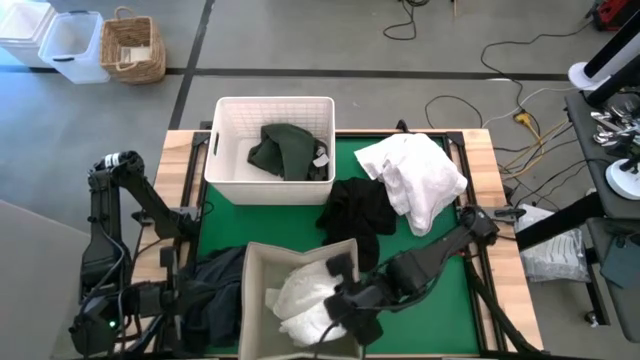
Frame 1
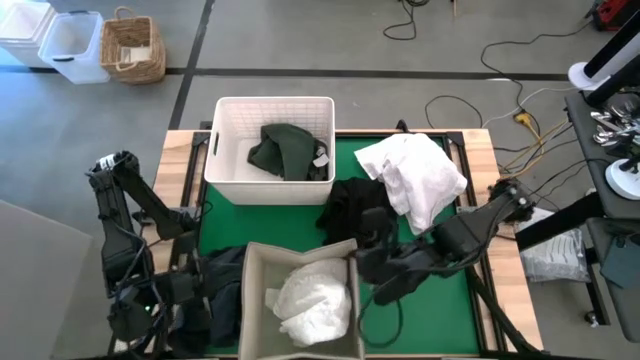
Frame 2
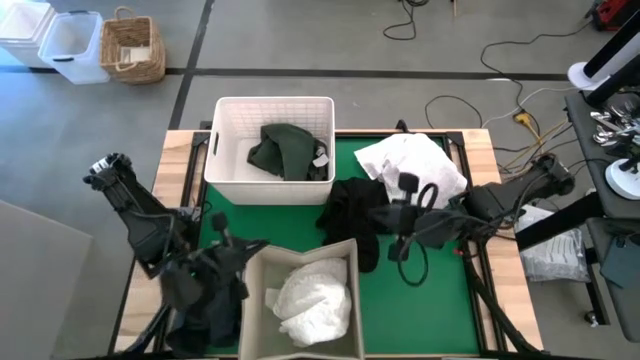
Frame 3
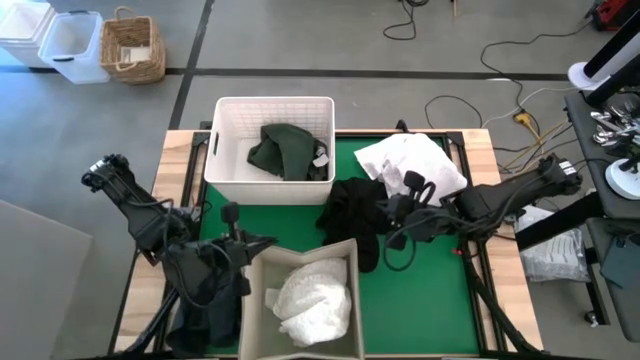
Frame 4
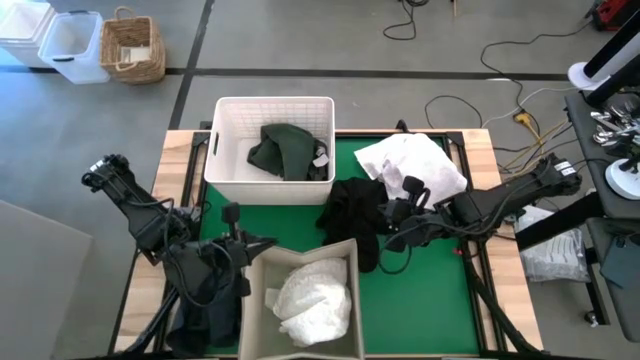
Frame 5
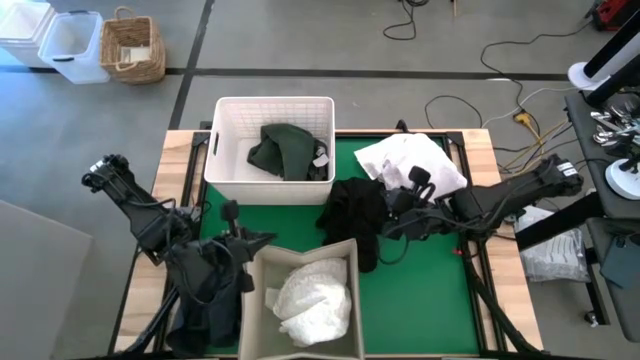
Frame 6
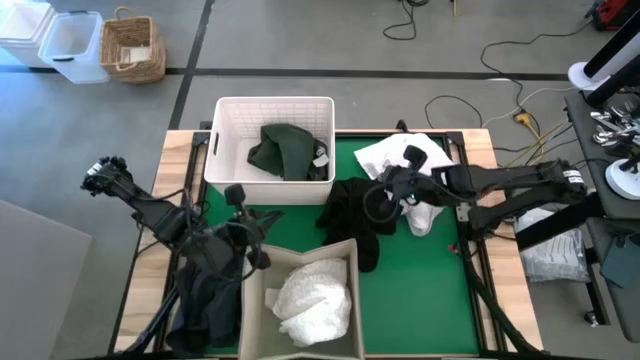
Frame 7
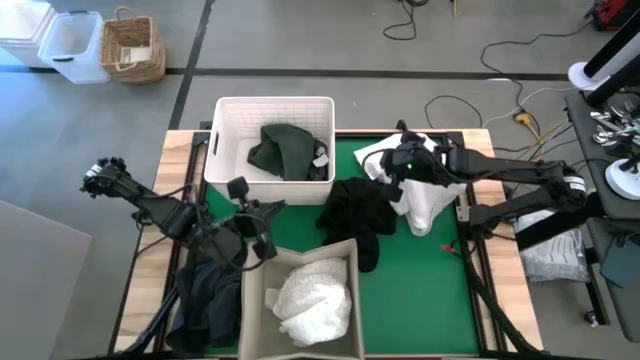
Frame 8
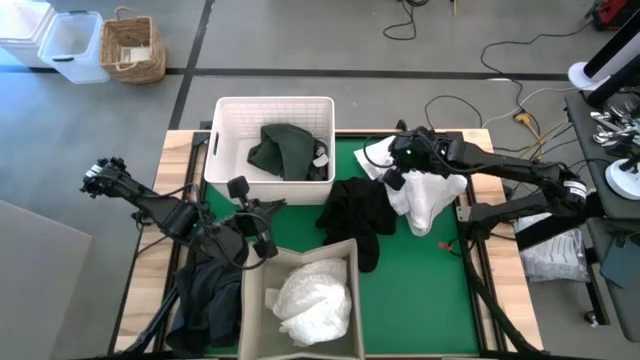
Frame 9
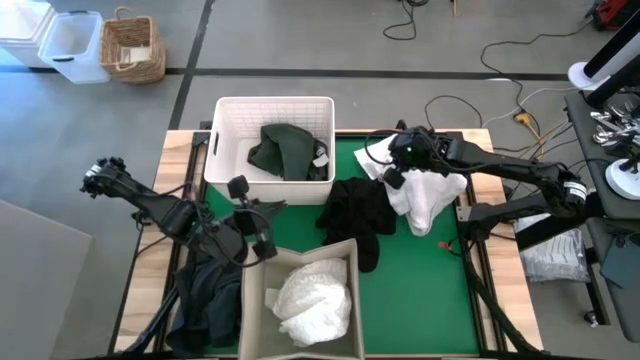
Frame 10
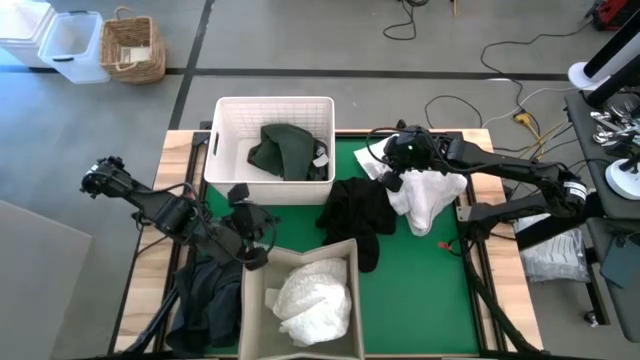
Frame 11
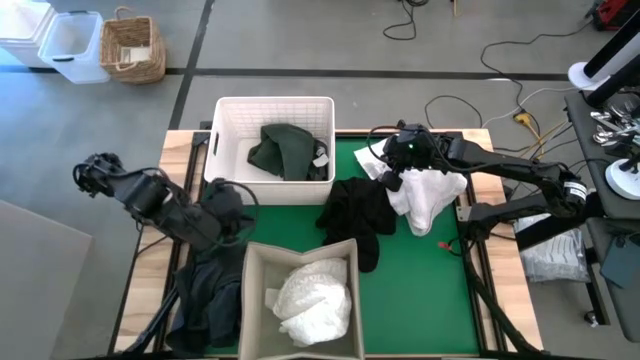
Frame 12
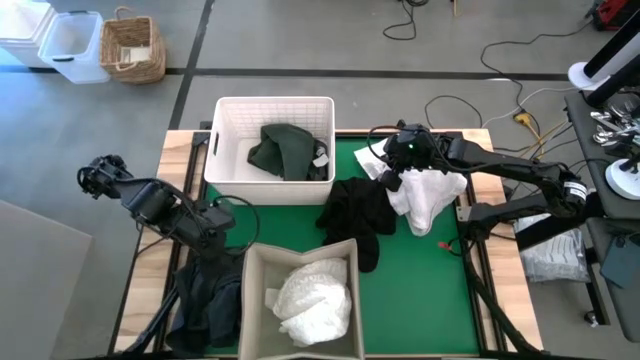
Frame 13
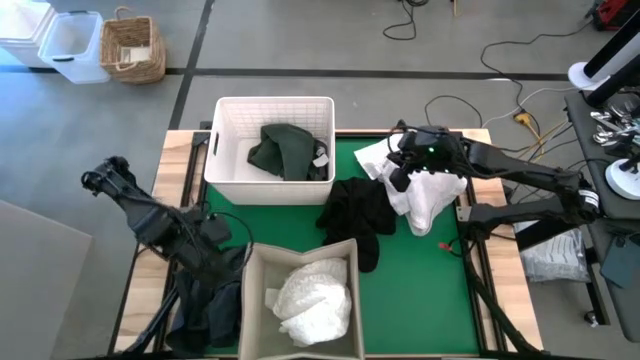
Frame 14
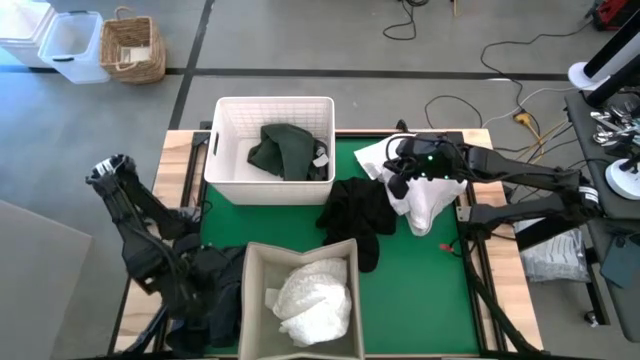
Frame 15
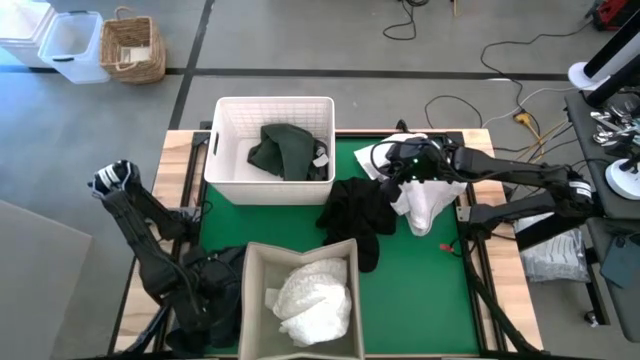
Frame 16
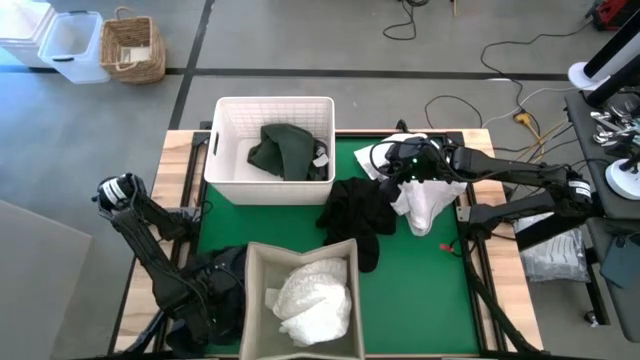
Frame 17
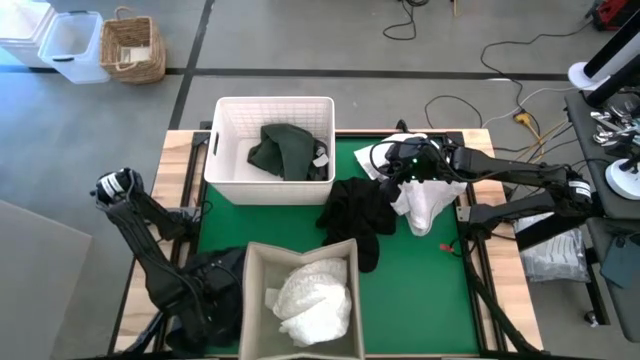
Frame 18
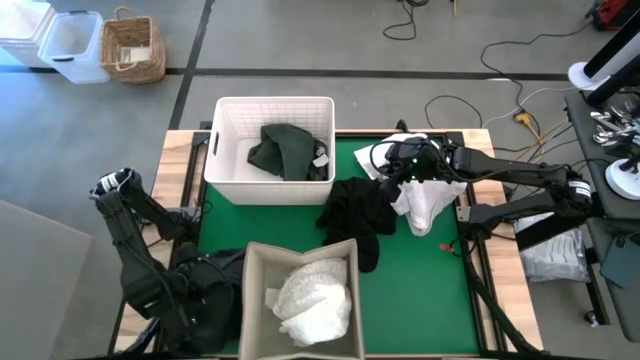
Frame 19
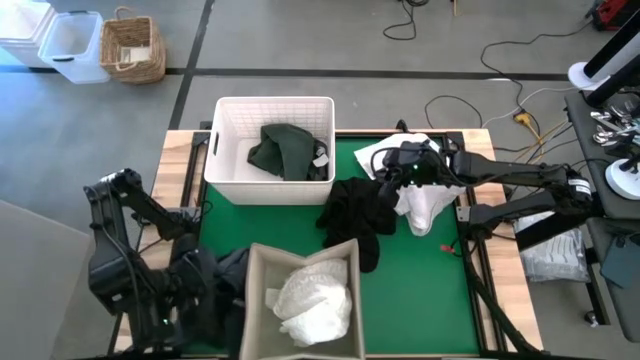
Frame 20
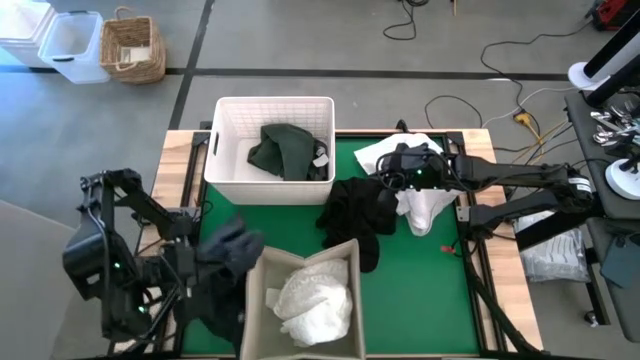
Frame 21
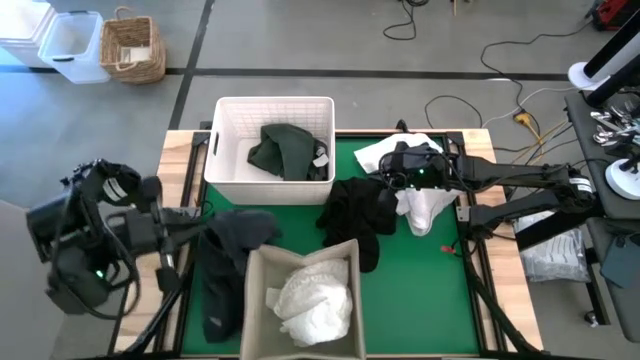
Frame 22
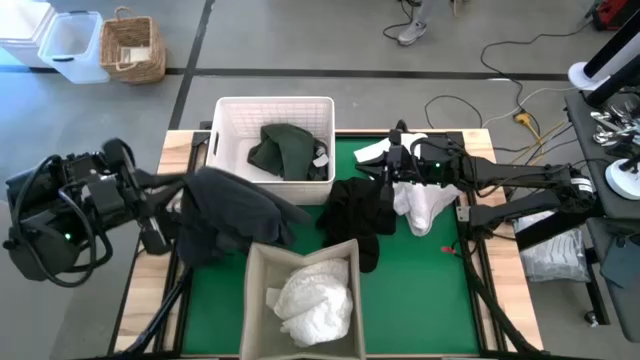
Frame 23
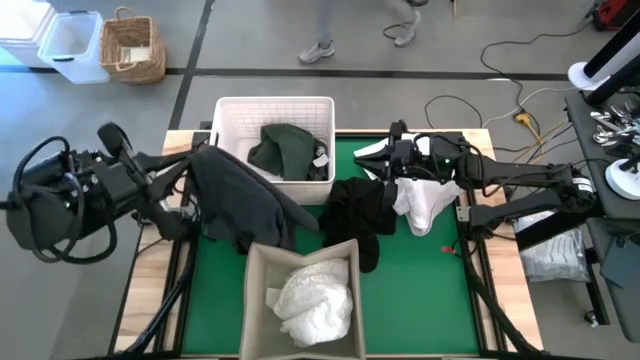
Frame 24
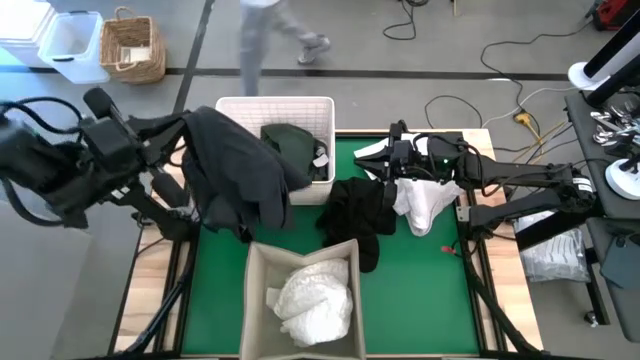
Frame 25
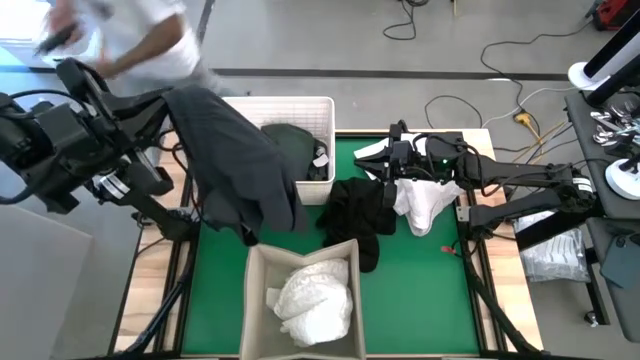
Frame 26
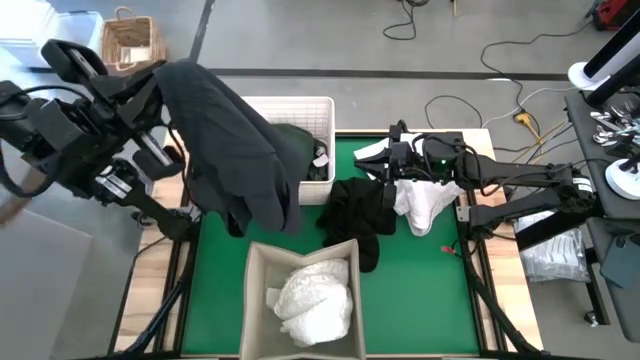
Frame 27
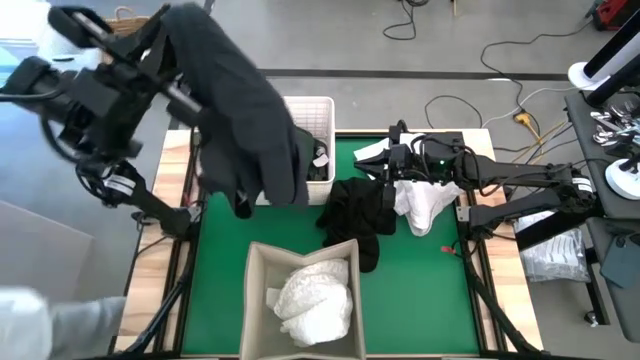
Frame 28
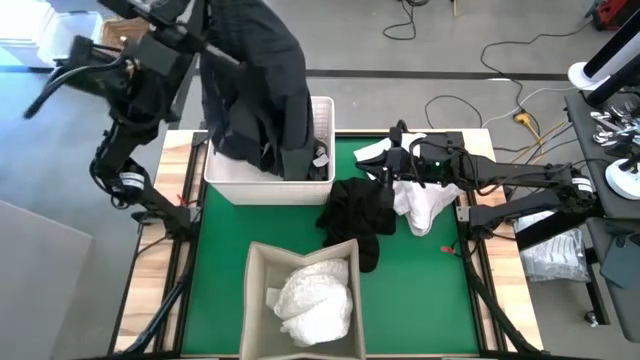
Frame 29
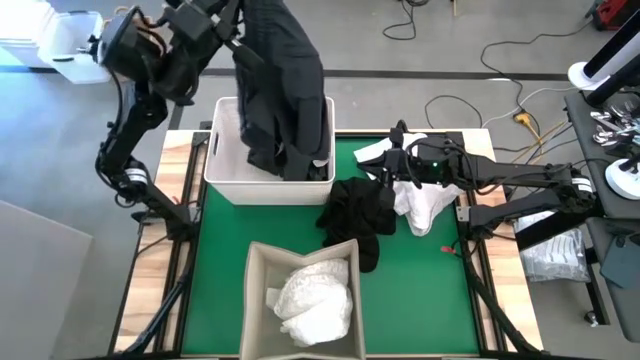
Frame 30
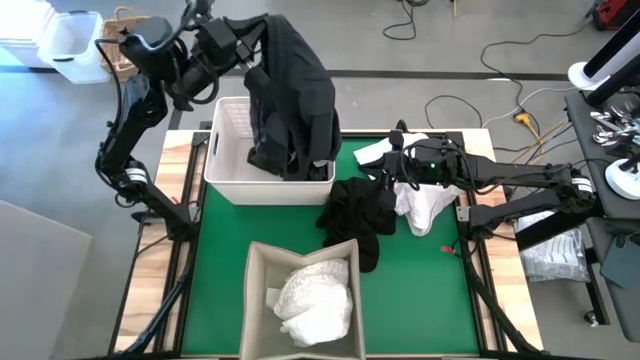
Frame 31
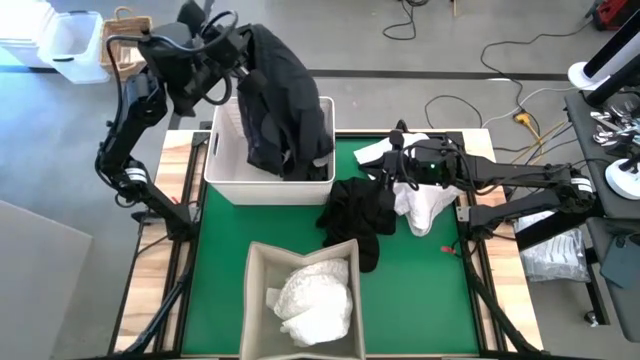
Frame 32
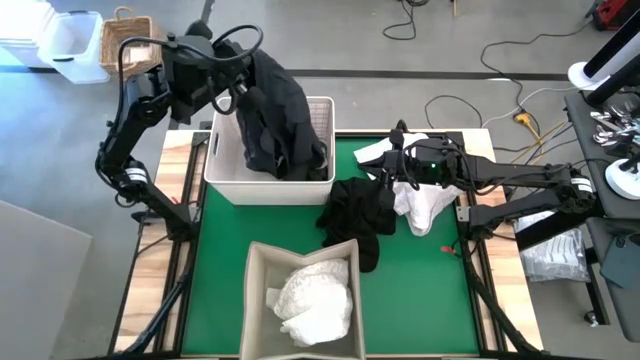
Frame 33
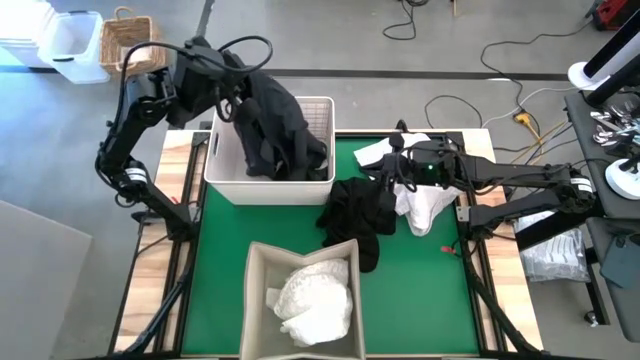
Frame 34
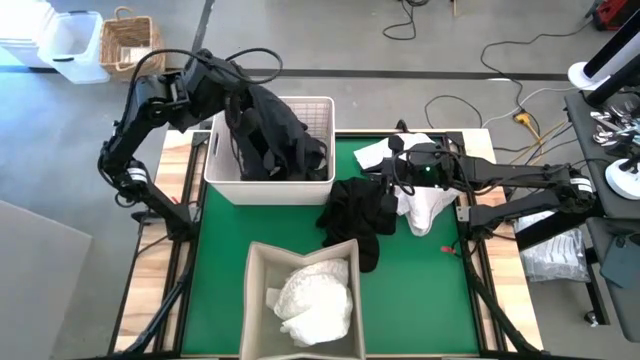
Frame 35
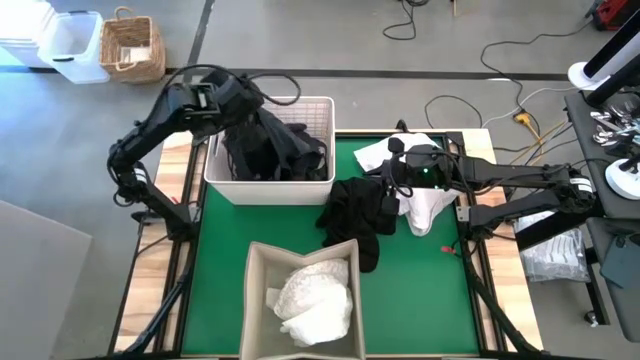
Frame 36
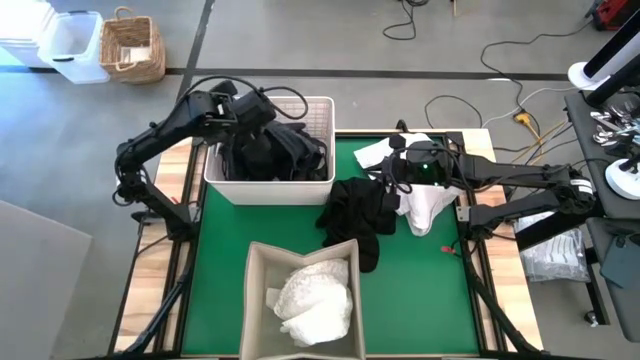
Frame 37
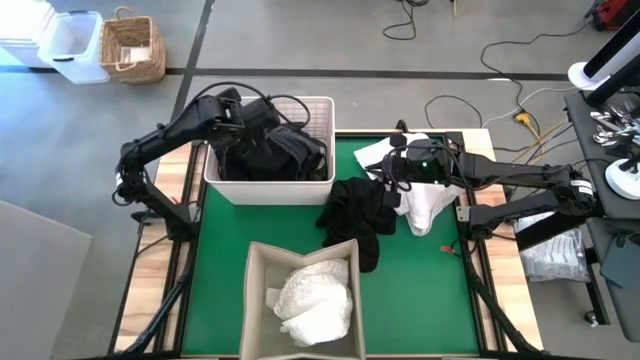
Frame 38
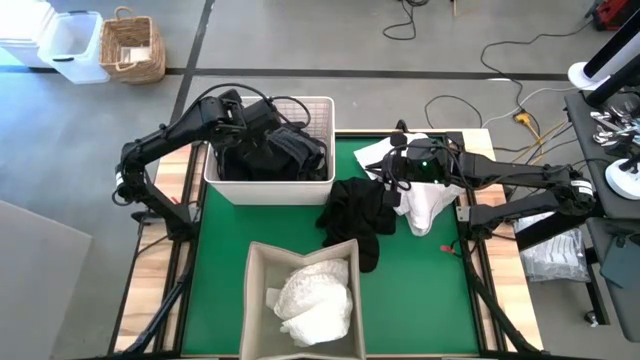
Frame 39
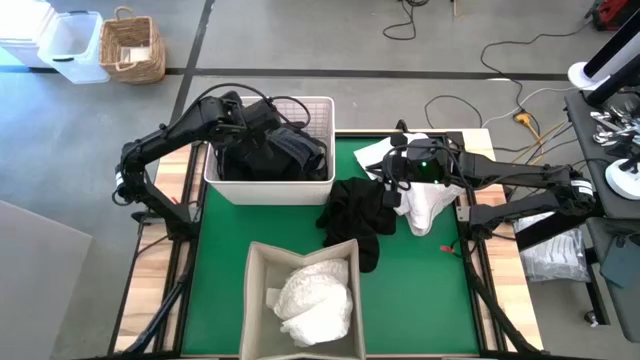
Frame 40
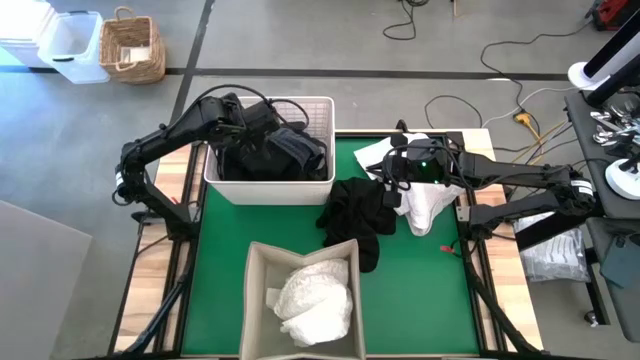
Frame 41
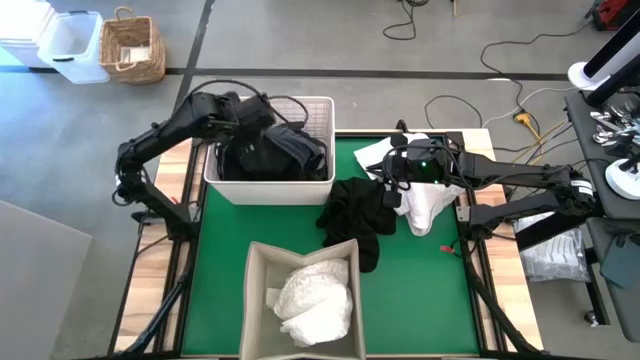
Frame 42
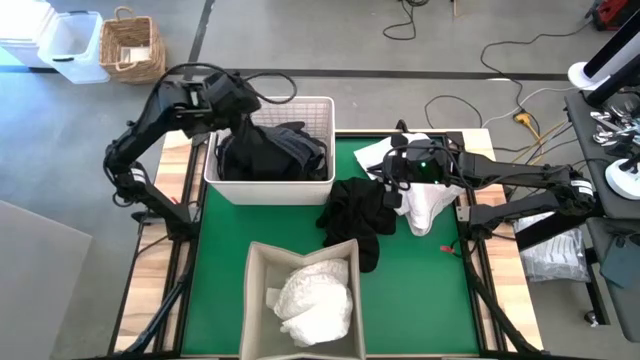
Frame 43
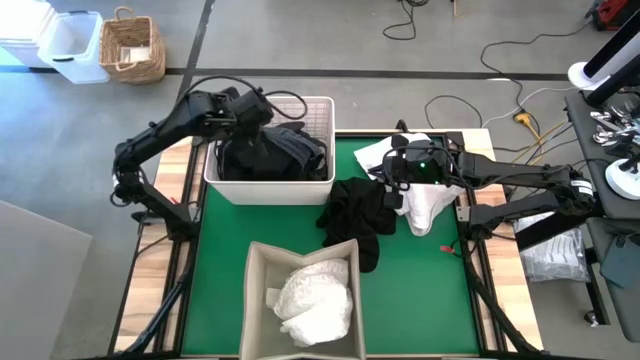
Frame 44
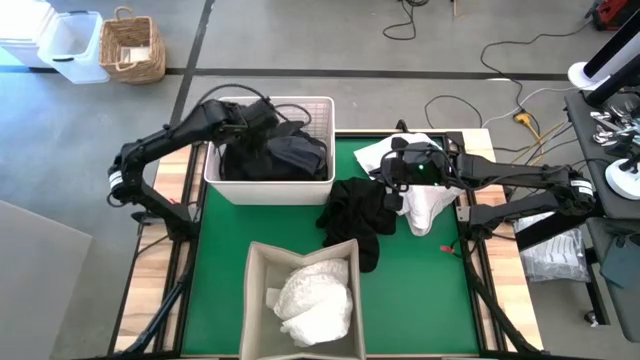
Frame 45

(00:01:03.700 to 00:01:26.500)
Put the black shorts into the white bin
